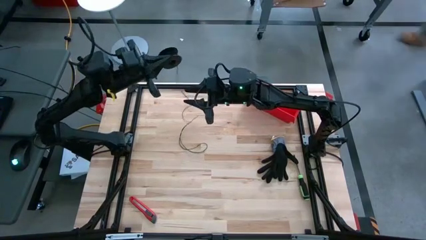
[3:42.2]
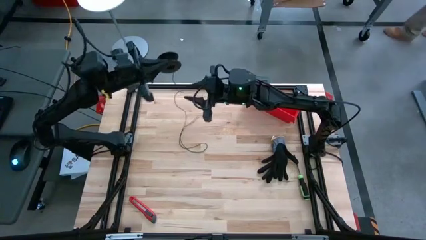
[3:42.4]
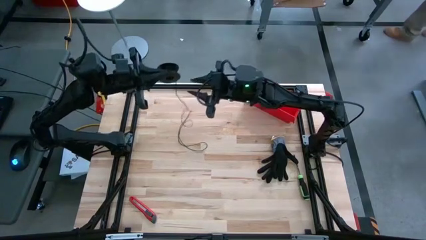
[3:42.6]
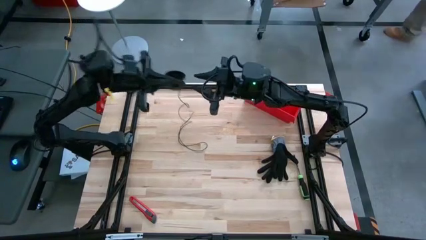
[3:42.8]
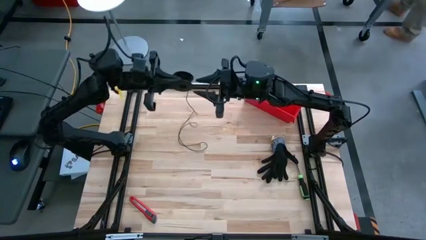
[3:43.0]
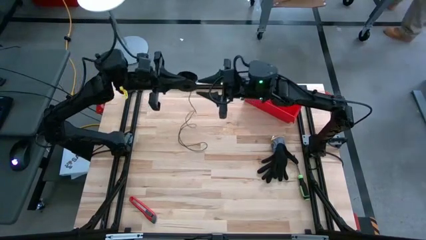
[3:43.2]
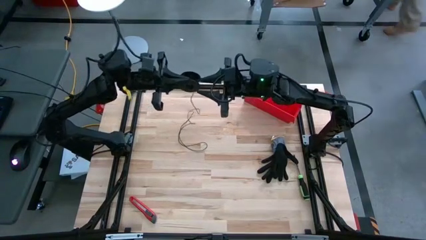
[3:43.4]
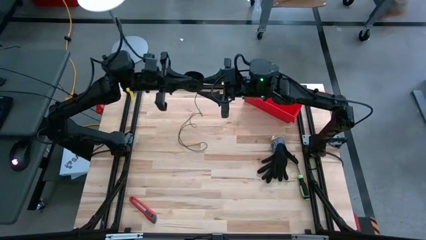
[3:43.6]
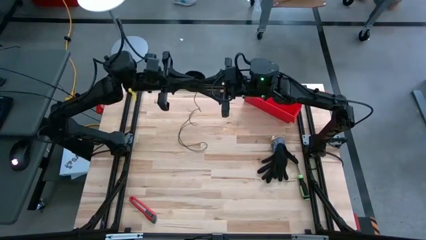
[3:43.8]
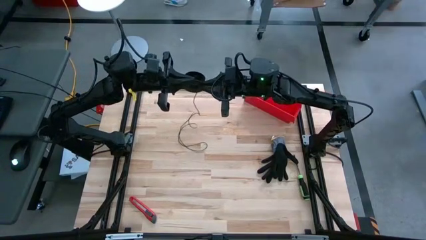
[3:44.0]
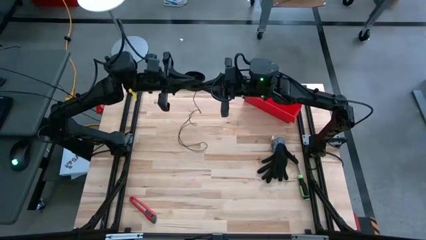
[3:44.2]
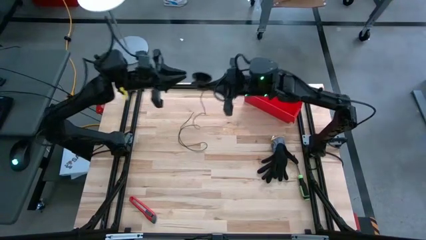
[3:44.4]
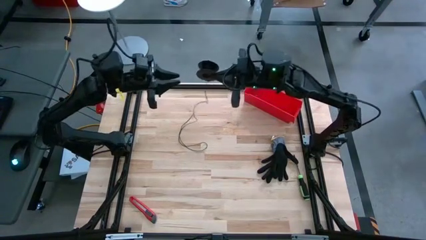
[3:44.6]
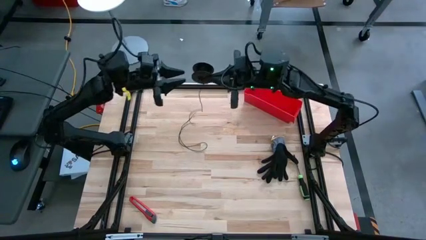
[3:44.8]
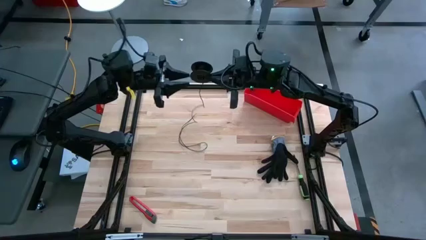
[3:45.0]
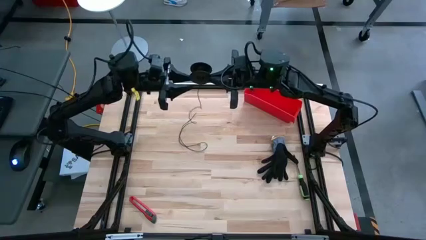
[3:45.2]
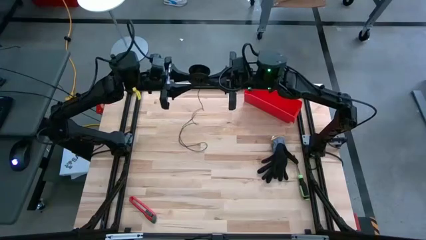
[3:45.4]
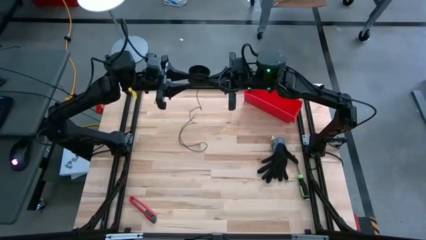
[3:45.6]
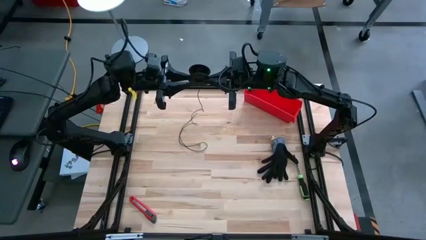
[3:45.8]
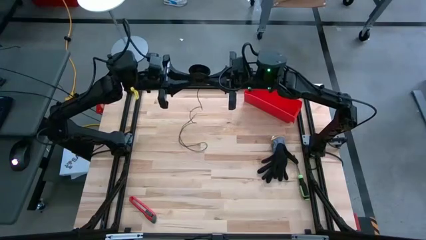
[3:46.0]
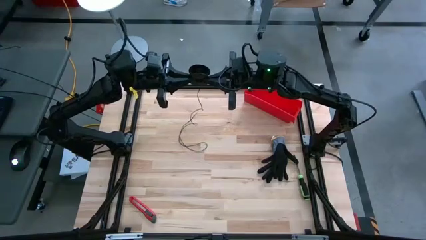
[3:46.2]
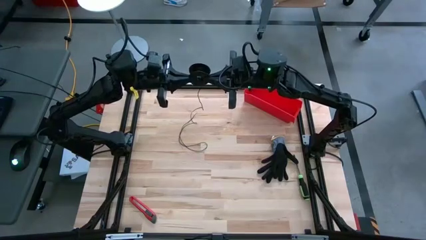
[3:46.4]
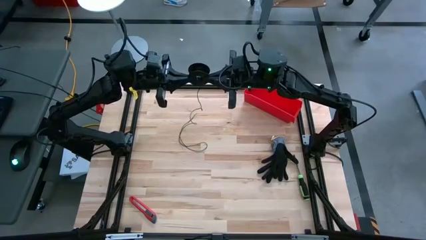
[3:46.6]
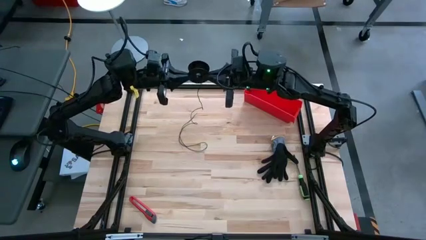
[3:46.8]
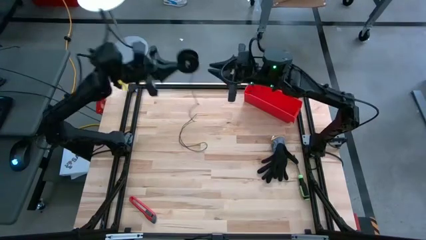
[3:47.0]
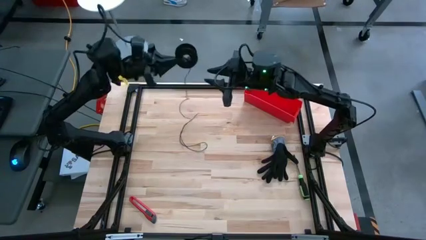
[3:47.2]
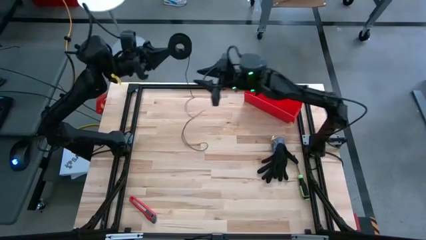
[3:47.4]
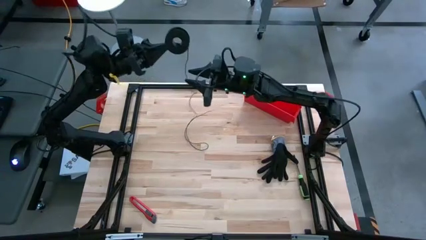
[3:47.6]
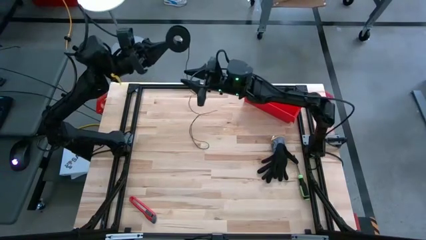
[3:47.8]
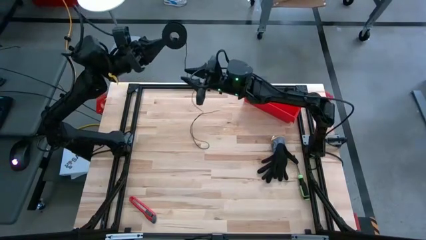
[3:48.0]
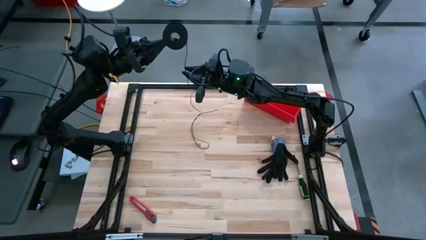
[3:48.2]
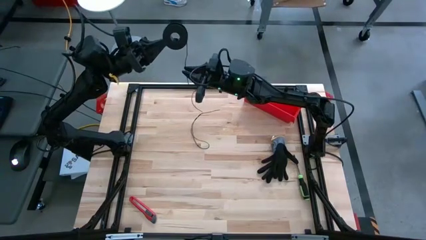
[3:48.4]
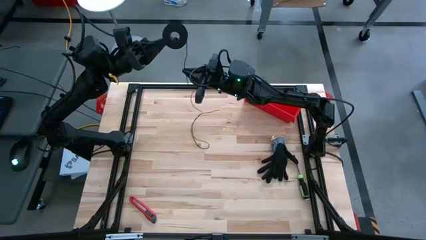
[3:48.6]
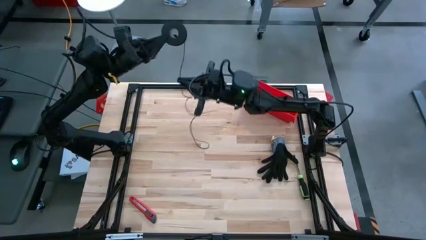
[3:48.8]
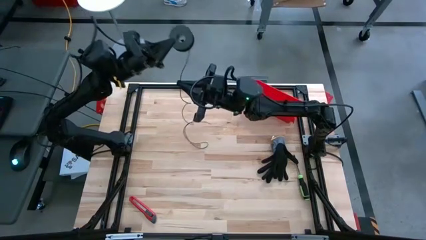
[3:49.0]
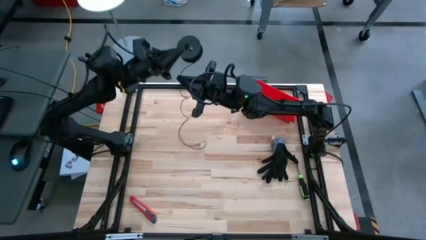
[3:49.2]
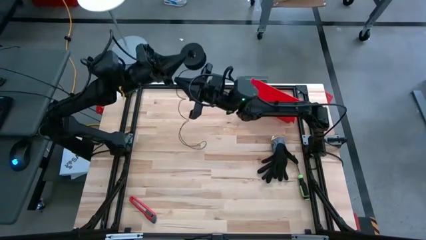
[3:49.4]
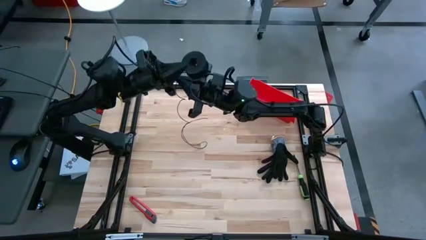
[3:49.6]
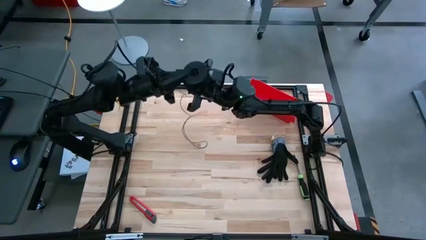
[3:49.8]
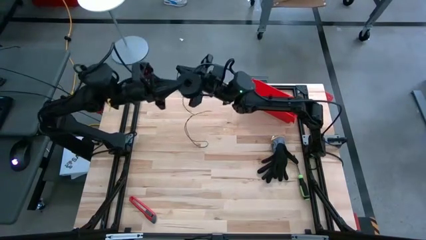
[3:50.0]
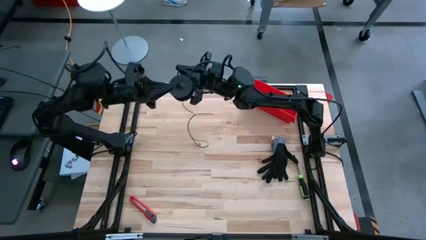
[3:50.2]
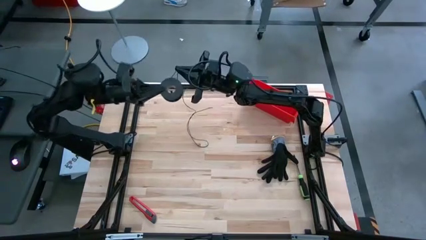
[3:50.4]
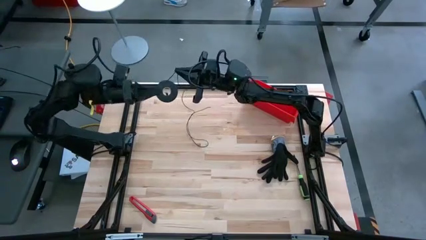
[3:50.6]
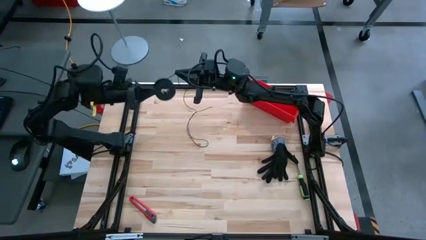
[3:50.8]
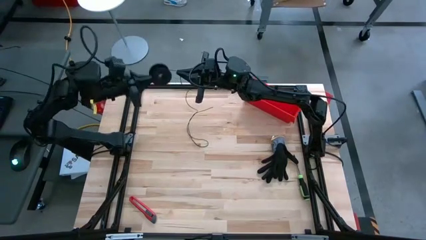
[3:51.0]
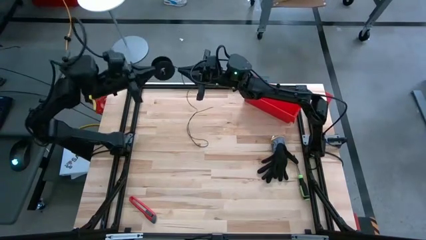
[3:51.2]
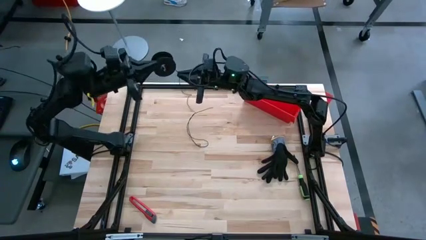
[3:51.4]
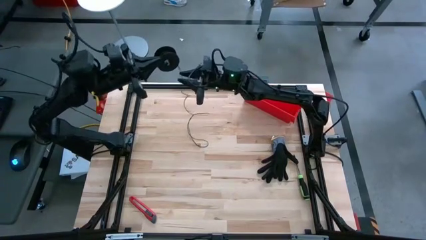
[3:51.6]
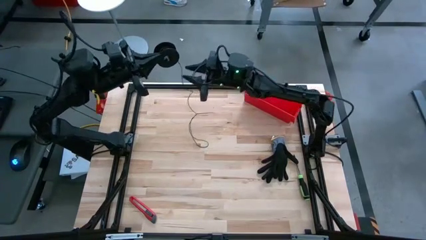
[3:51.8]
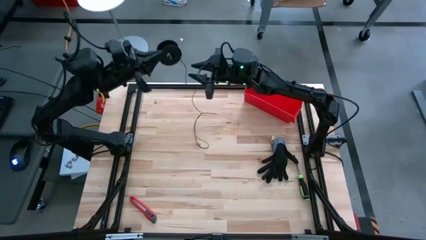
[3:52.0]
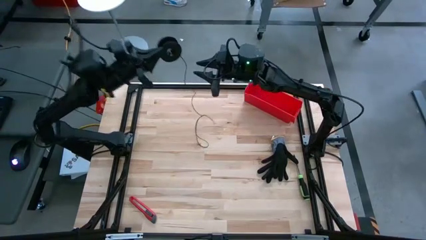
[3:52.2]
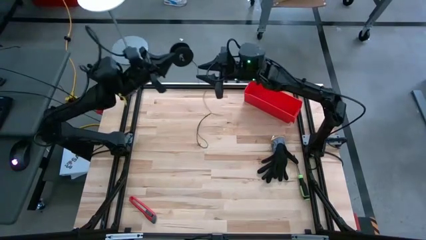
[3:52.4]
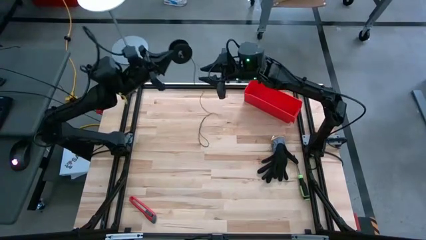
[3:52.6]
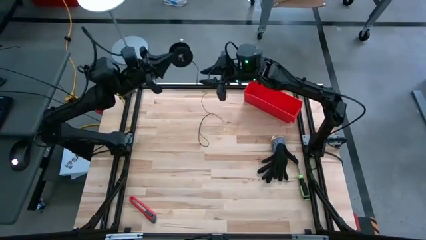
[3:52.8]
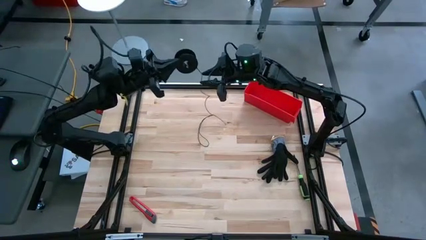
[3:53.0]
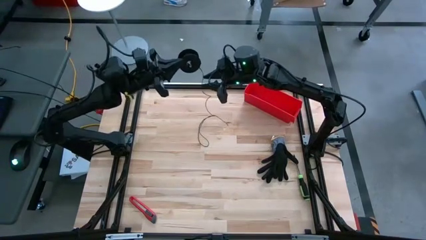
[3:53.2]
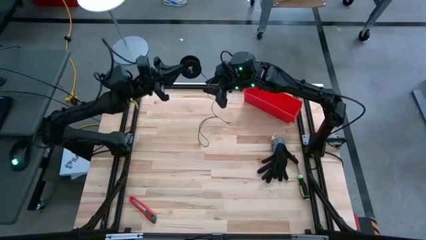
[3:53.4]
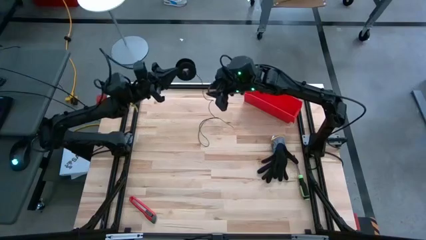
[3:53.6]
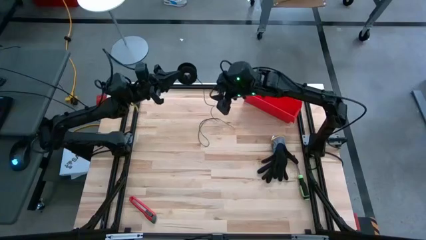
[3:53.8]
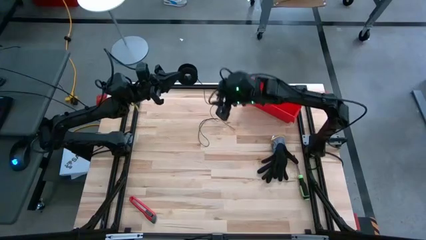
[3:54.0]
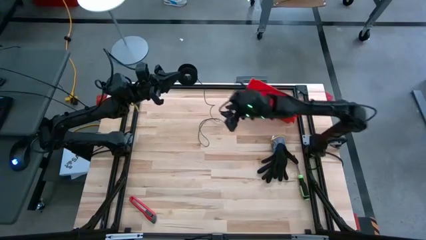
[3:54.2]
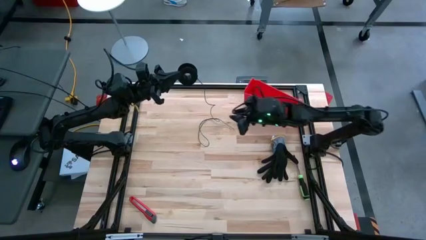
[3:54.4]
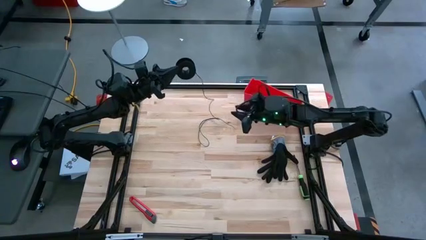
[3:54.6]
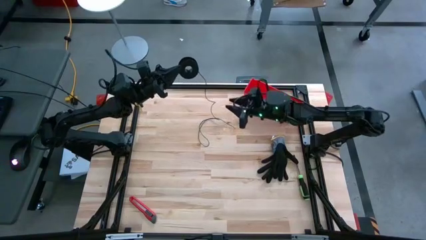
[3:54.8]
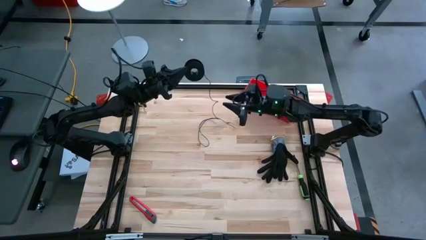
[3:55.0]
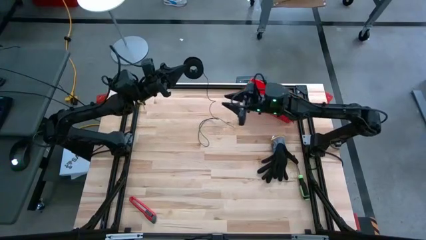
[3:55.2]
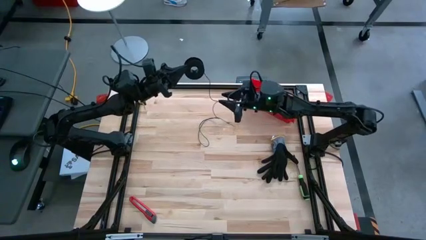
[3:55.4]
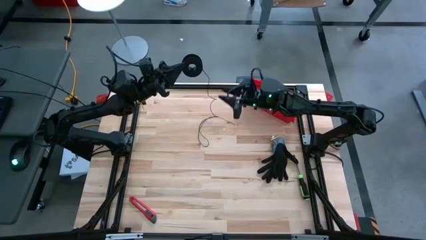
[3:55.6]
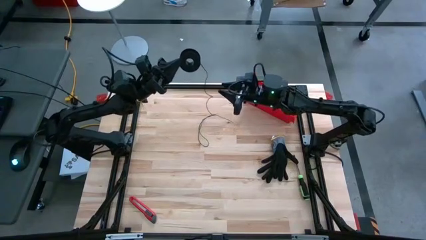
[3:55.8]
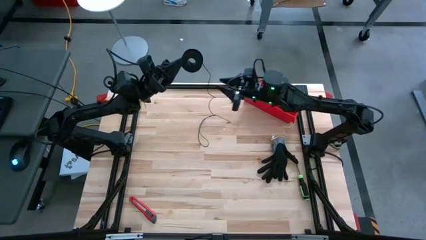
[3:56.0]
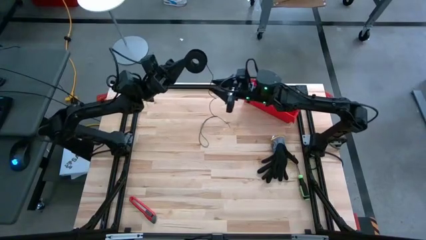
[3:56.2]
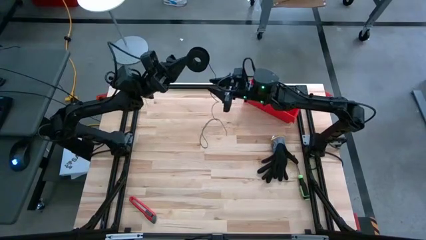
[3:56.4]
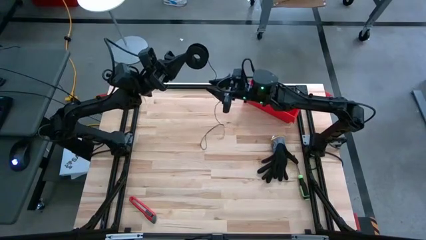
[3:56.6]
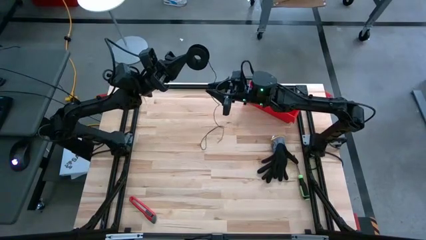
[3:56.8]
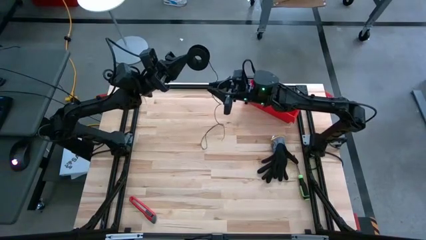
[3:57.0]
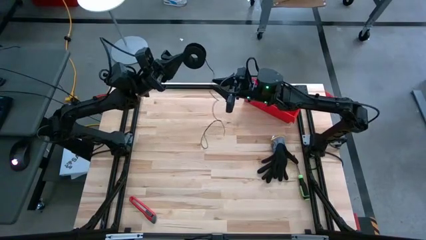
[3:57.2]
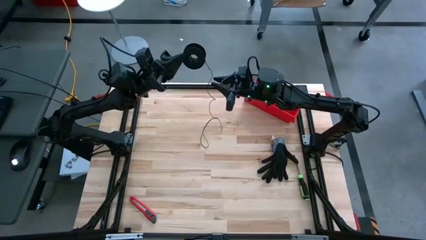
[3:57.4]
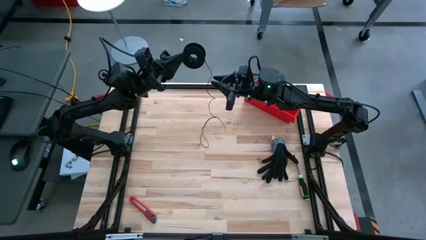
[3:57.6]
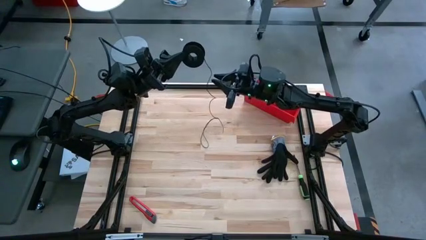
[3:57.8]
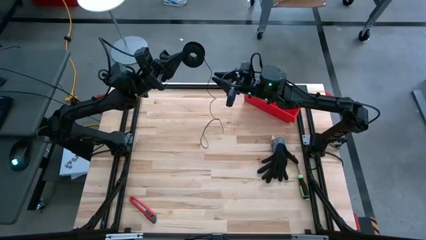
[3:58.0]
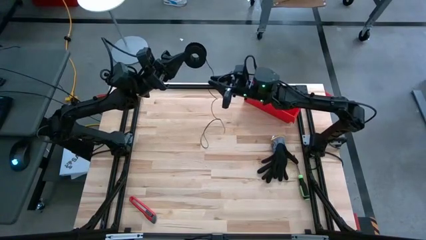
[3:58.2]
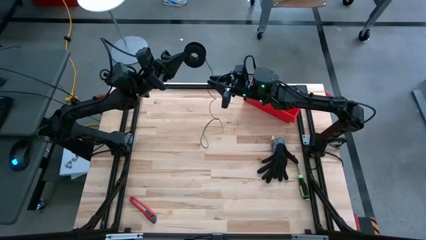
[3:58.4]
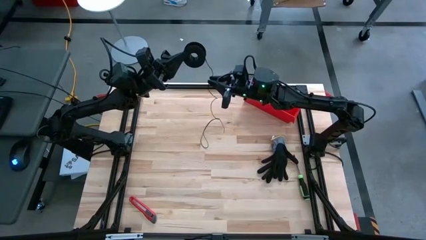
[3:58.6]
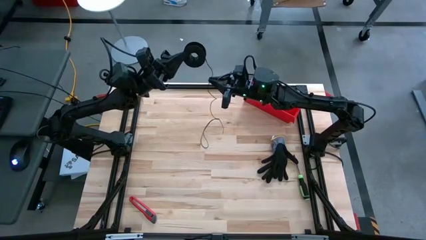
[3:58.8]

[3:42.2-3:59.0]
Task: Coil cords
Coil the black wire on the spool
